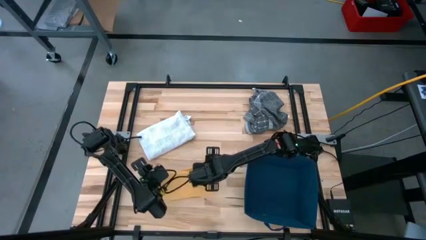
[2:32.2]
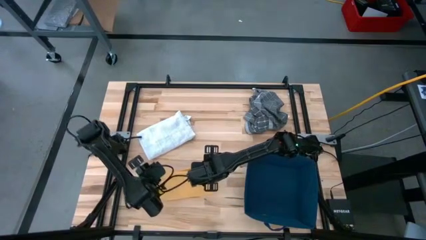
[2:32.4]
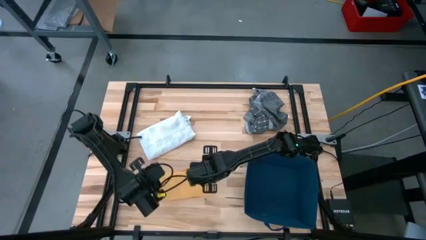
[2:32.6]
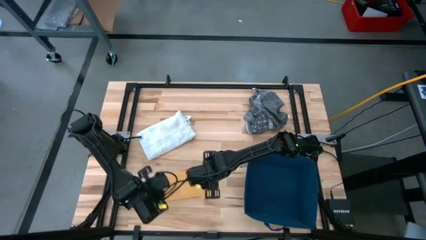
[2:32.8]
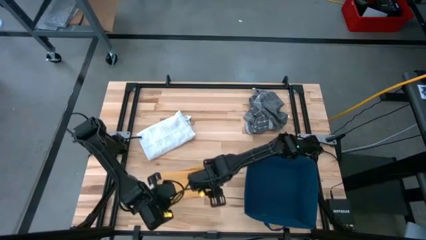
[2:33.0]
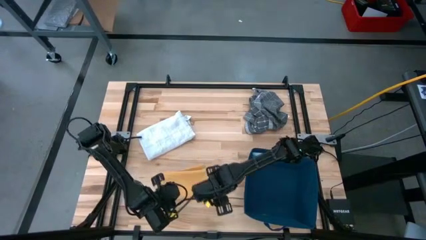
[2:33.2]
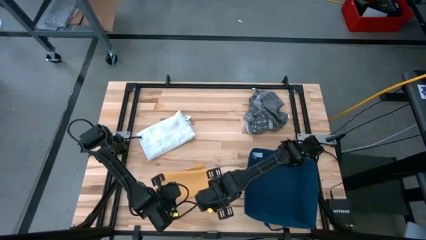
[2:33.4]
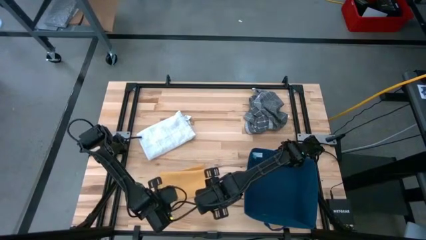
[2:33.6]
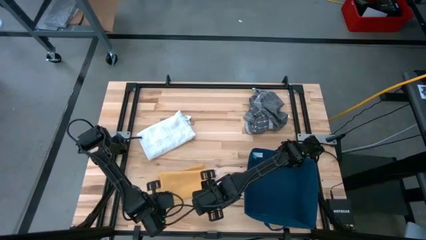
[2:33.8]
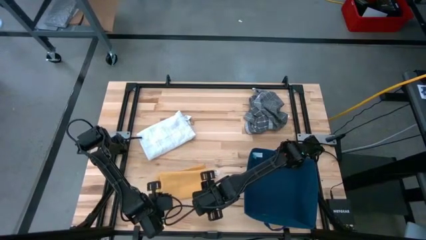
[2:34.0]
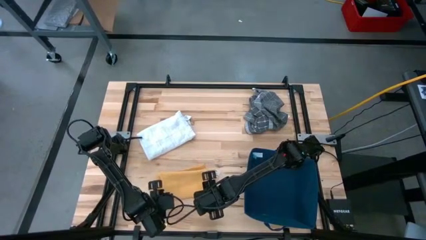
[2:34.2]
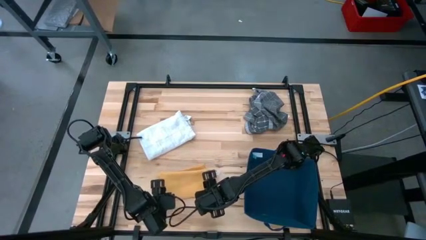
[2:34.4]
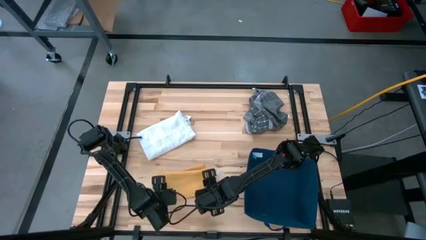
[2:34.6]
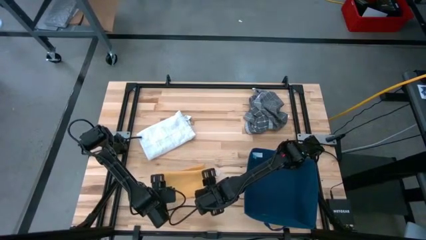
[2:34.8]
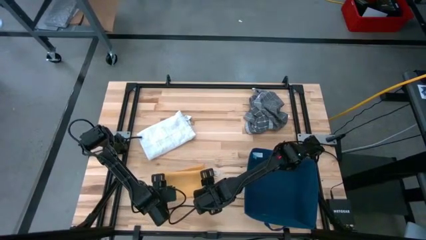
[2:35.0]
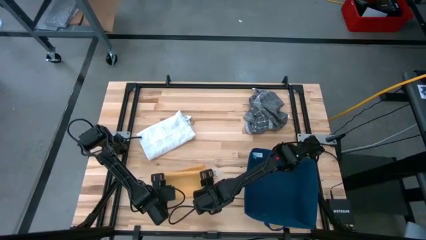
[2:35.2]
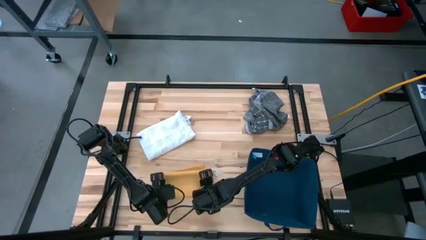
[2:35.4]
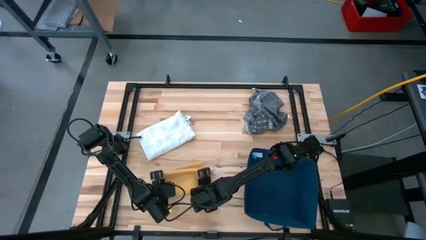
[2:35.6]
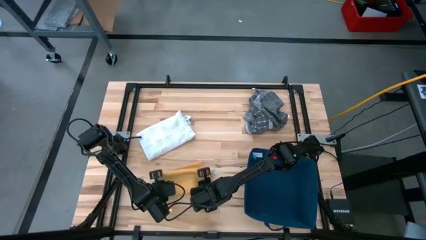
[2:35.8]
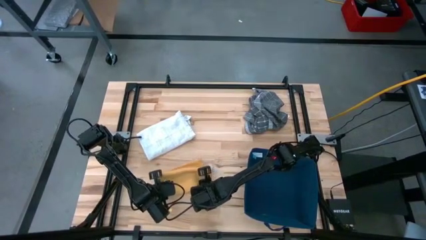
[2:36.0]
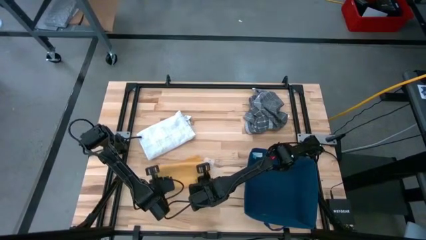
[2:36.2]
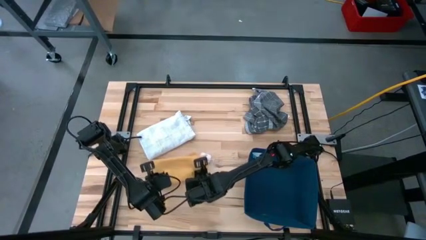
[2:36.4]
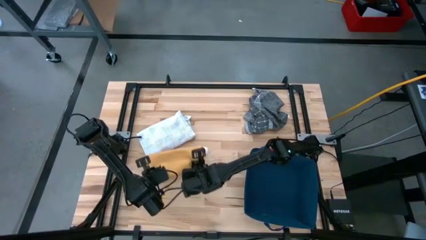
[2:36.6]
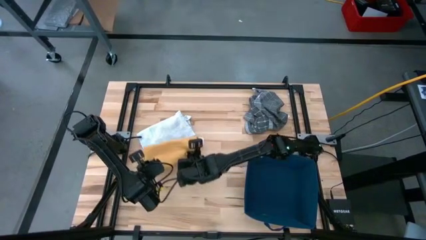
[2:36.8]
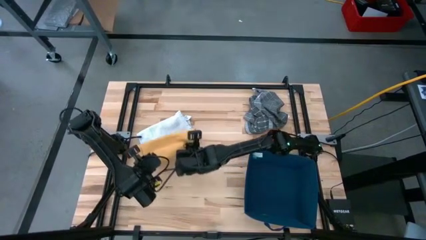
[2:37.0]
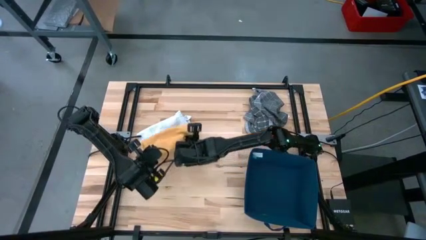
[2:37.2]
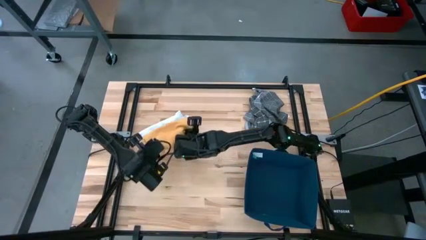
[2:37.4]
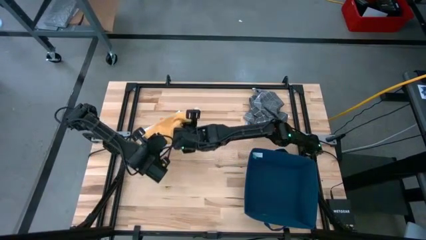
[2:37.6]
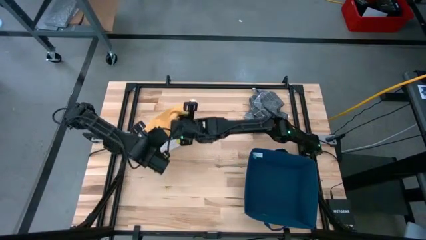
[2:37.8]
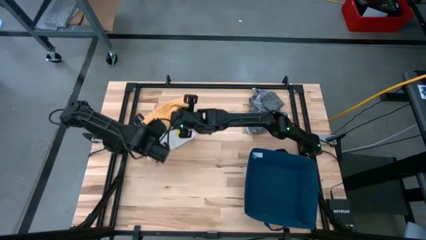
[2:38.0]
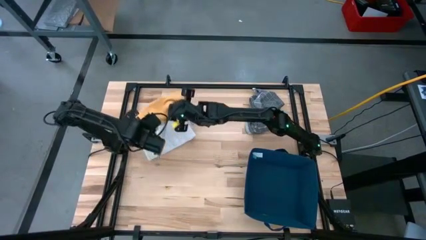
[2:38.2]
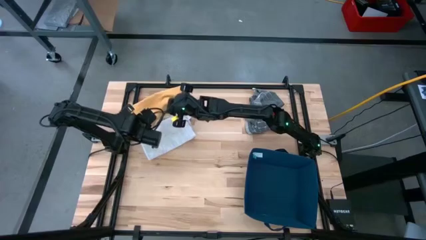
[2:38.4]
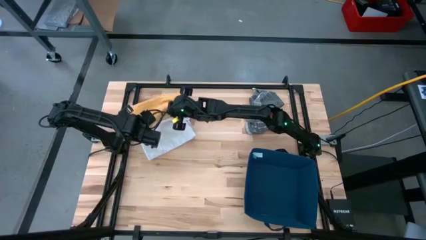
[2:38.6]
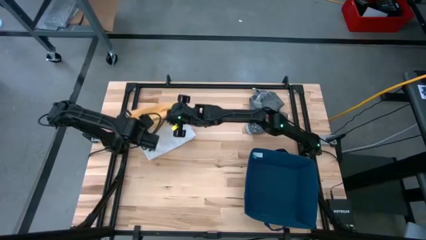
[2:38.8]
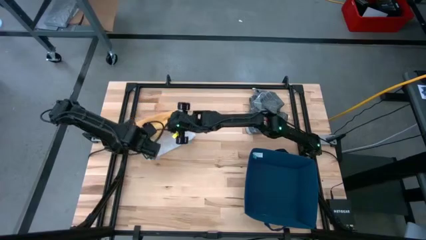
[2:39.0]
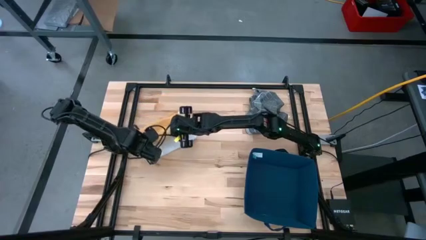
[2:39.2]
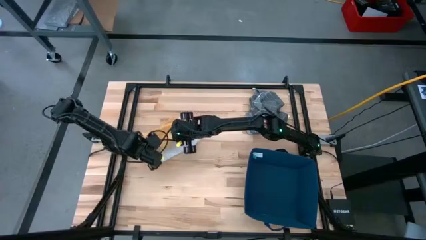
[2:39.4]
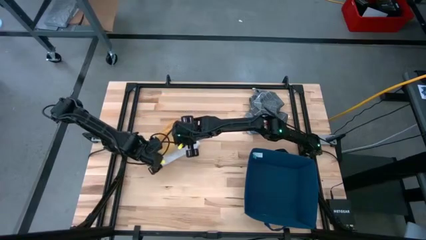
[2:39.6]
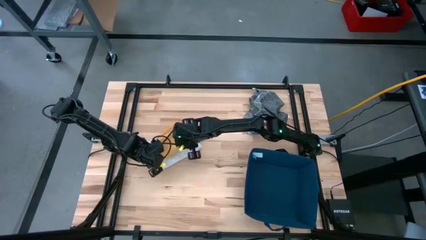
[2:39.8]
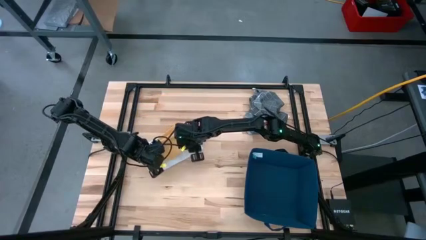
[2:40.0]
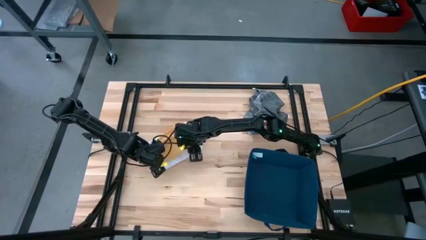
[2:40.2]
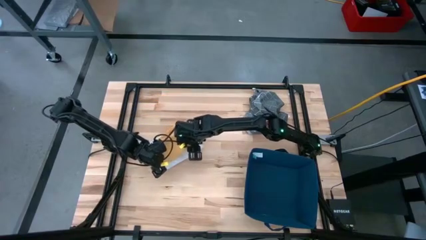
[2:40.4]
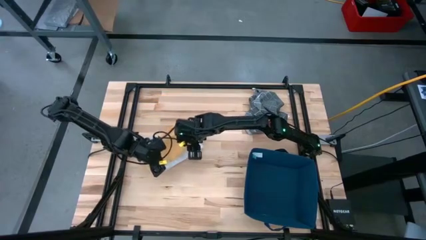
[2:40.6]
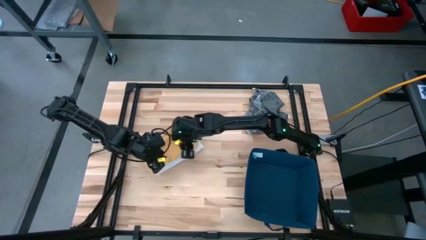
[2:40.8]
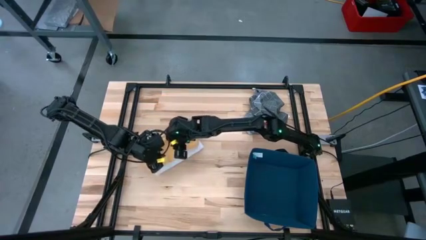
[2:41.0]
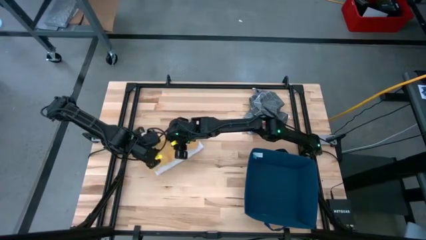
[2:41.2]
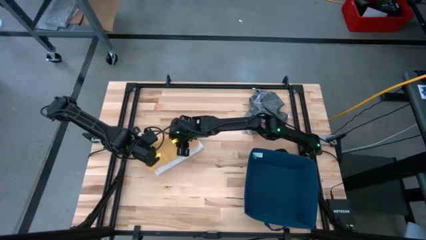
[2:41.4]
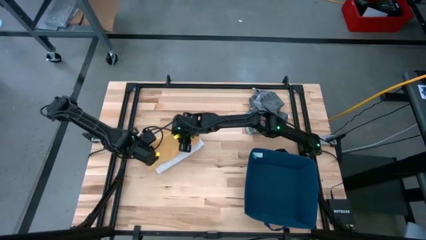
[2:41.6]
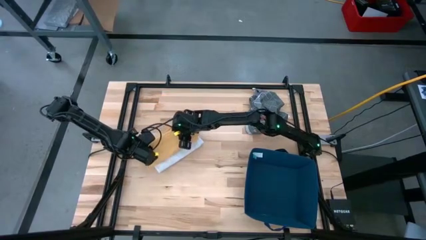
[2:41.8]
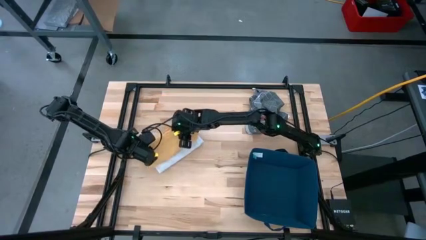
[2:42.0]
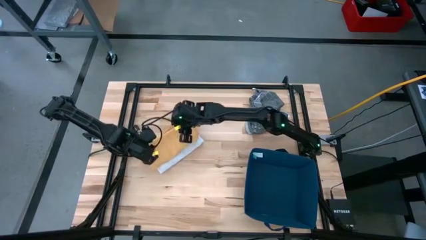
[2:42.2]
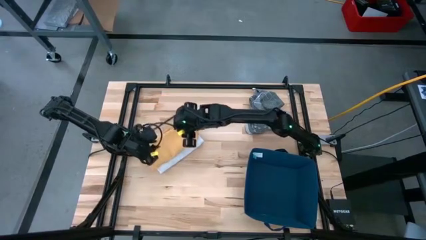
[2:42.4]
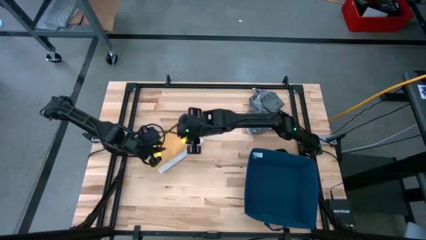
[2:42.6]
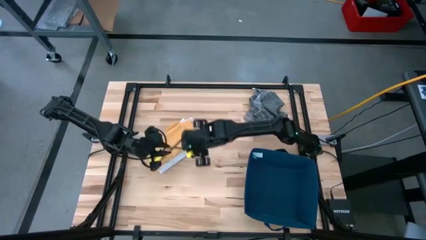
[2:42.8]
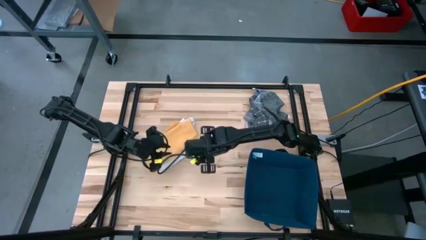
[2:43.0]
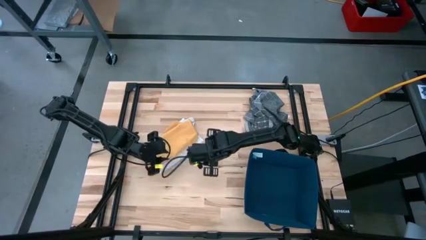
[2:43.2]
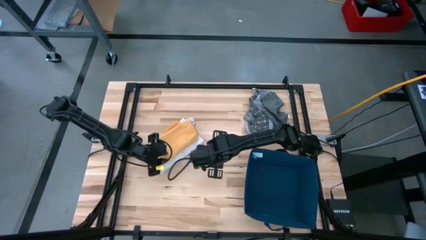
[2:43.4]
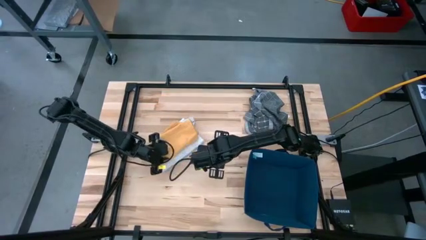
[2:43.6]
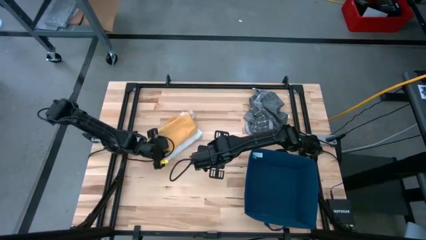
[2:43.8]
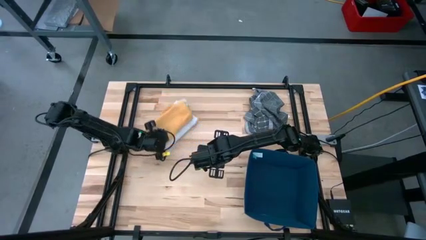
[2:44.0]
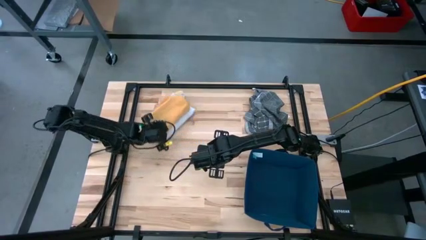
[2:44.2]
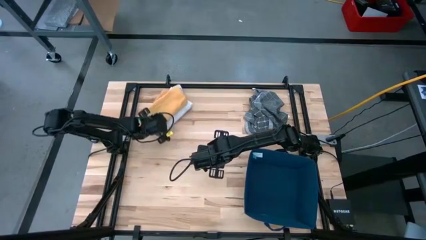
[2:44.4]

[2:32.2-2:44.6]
Task: Fold towel
Stack the yellow towel on the white towel

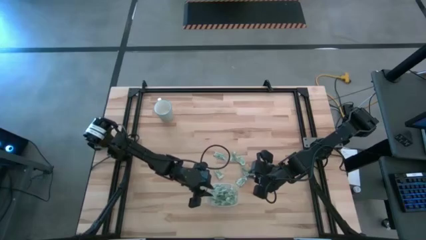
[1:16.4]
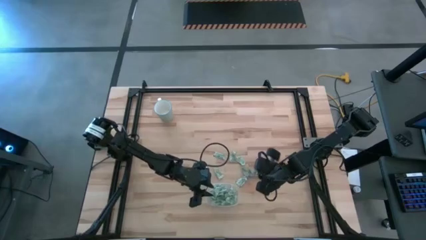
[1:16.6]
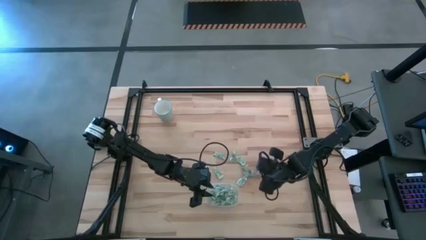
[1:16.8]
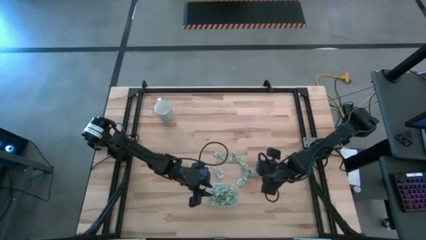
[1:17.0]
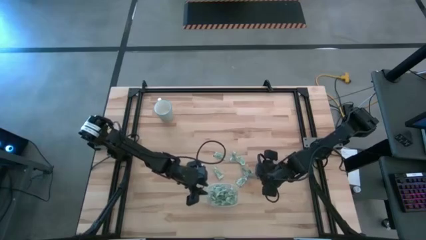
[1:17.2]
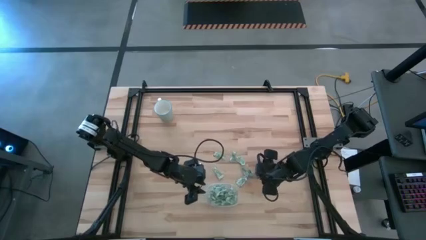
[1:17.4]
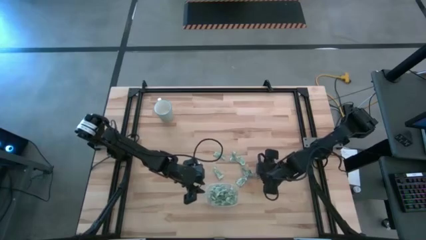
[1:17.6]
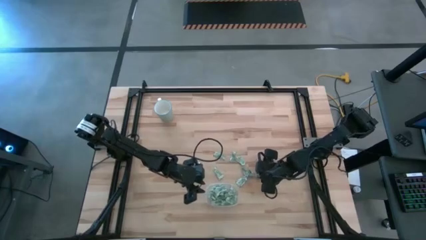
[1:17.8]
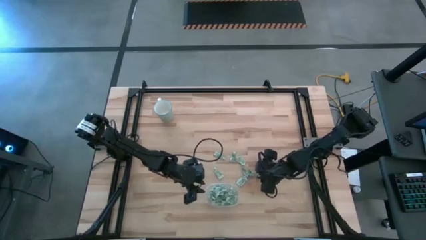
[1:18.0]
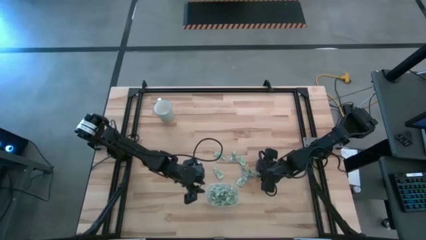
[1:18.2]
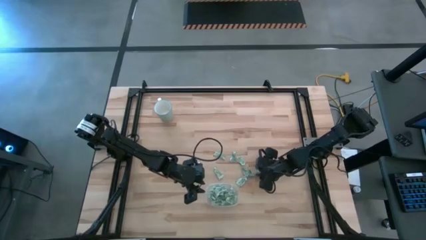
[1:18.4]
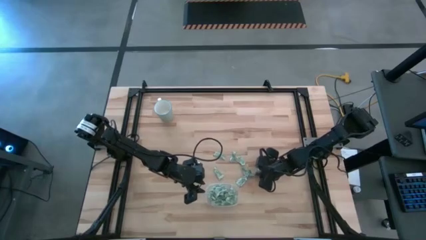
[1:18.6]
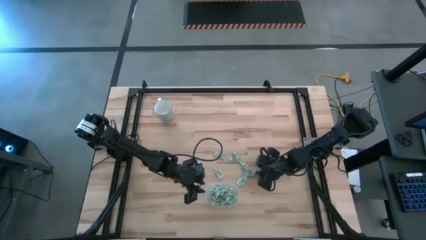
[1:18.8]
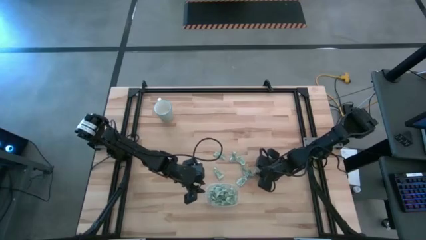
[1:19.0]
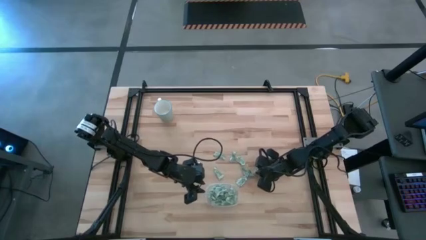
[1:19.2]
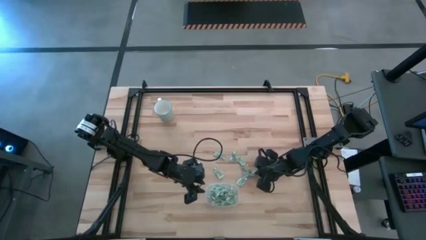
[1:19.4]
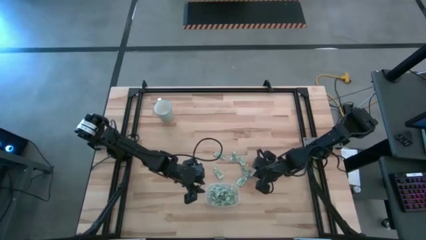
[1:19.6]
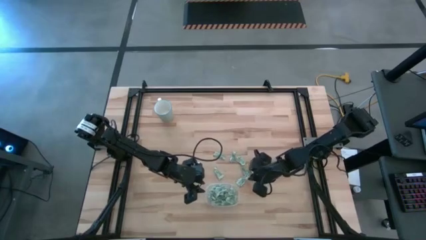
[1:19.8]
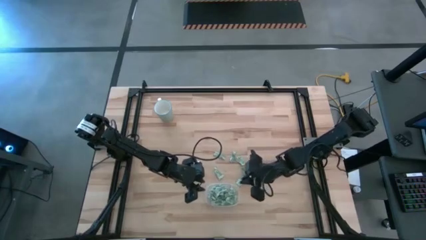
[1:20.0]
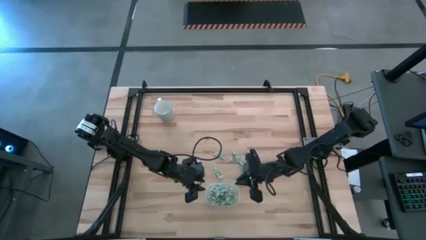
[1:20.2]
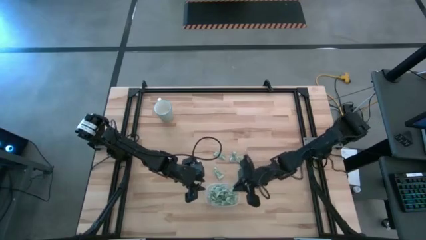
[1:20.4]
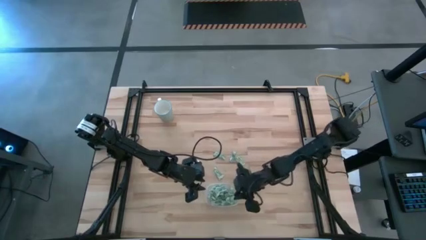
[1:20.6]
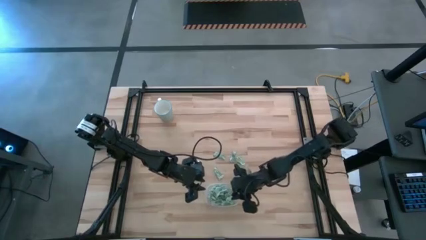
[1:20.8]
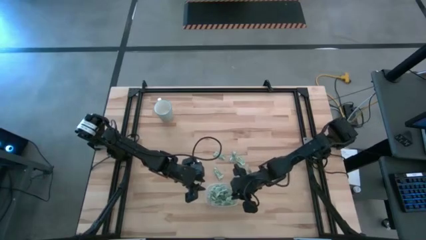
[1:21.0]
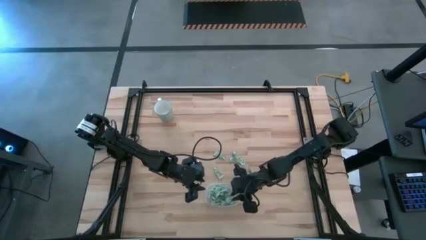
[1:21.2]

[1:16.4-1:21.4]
Task: Pick and place Stevia / Truvia into bins
Put the stevia packet into the transparent container
